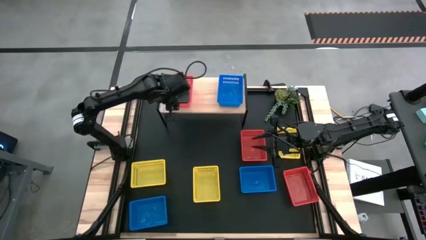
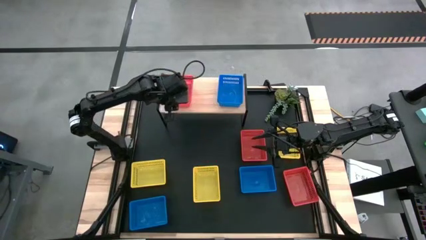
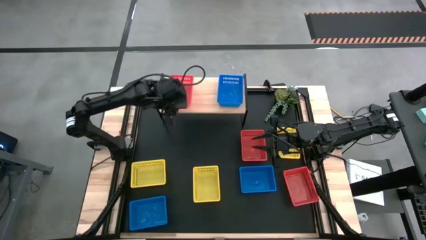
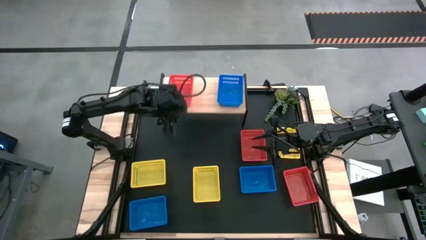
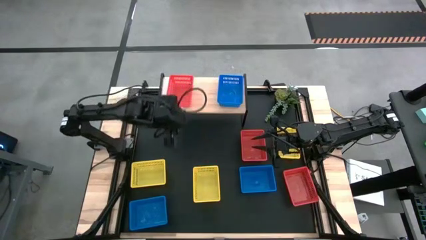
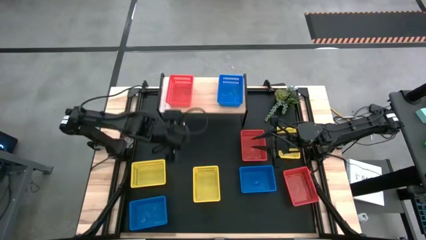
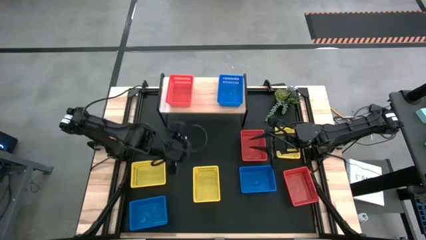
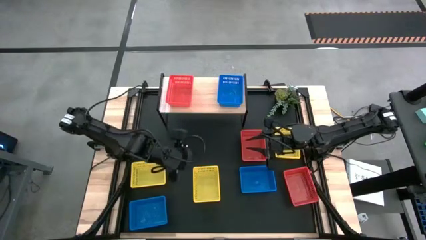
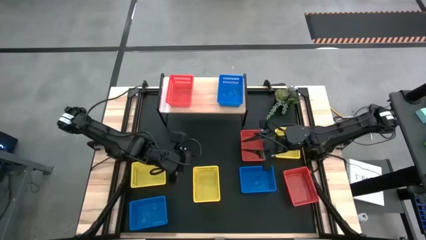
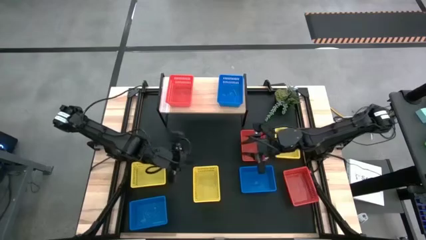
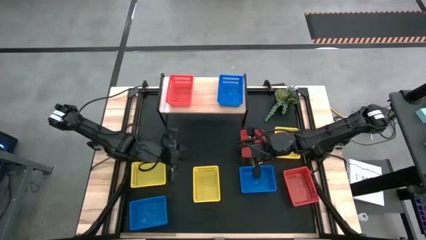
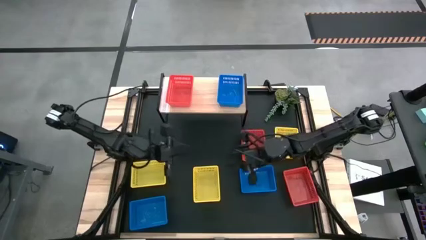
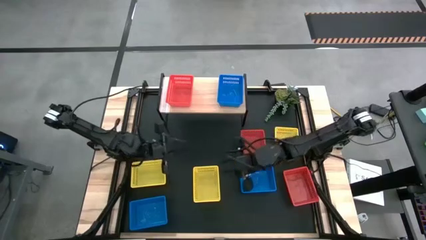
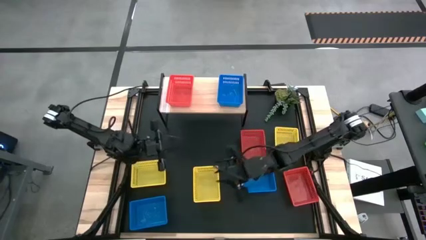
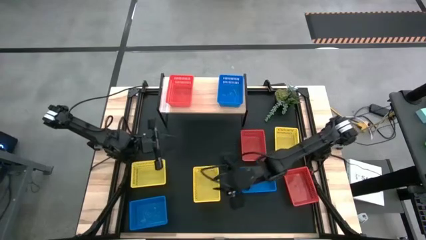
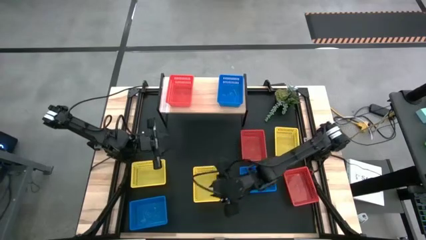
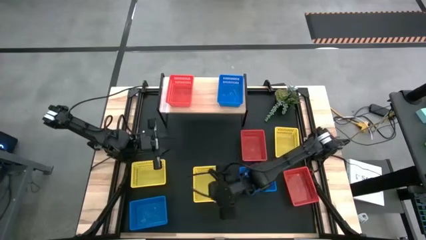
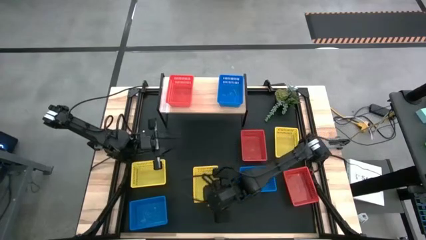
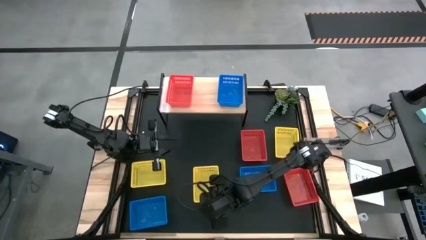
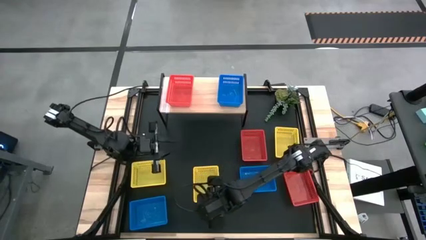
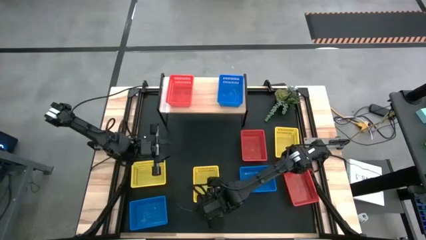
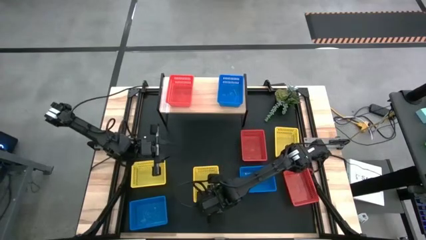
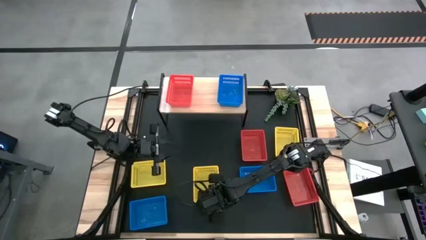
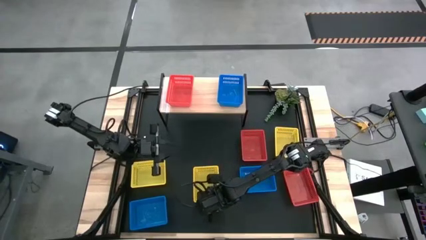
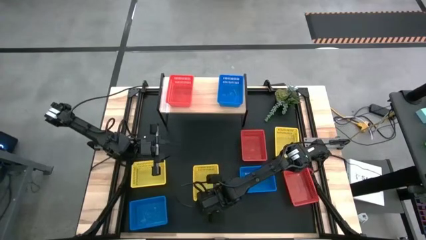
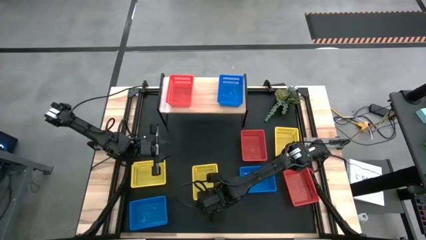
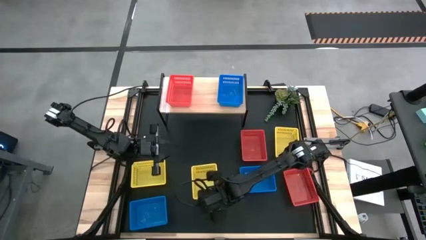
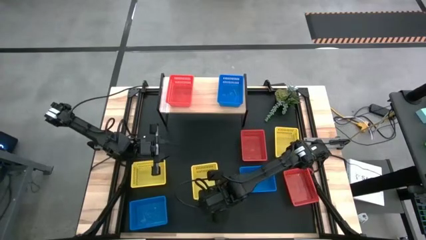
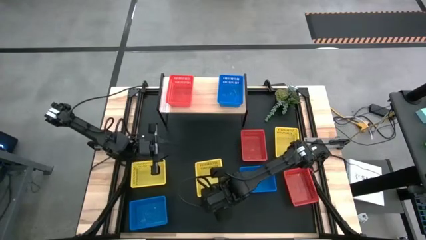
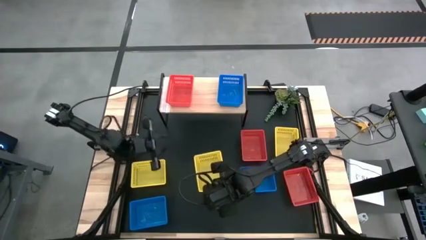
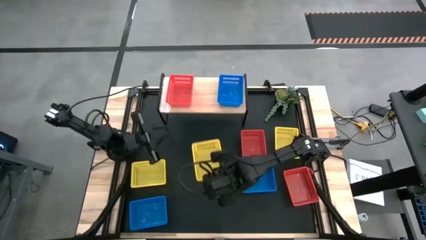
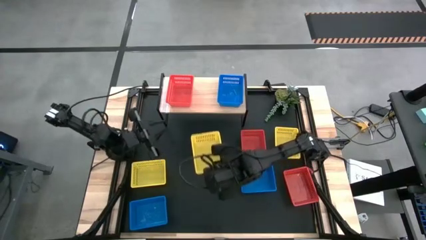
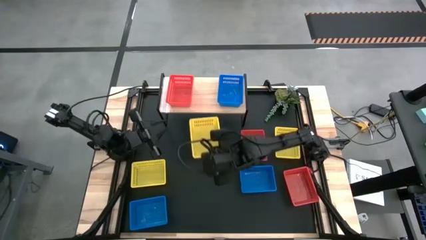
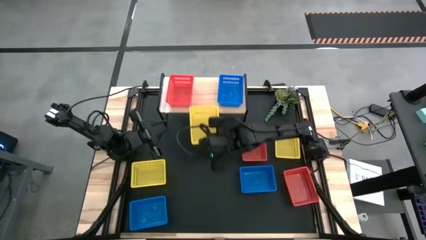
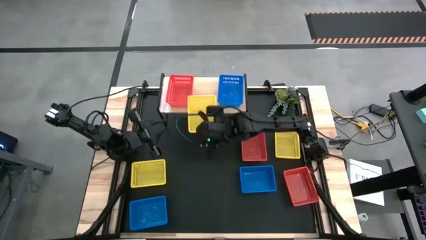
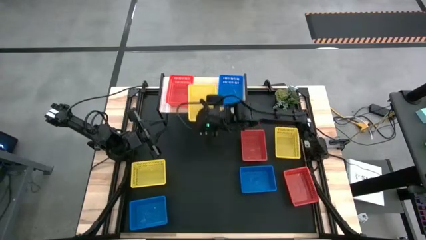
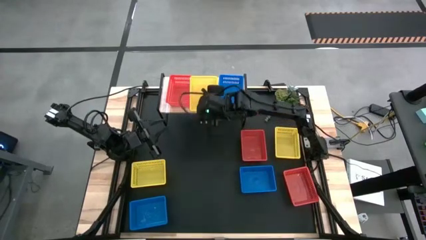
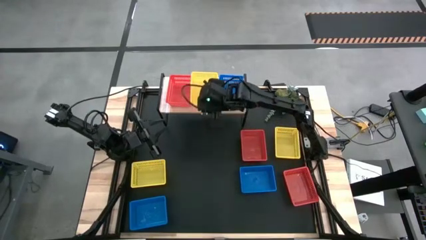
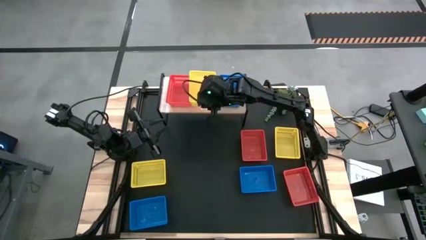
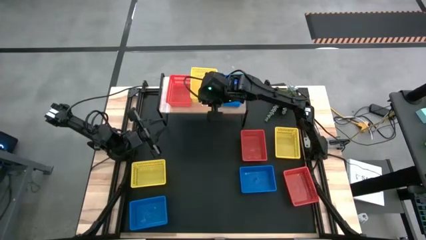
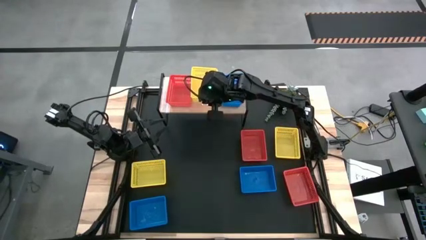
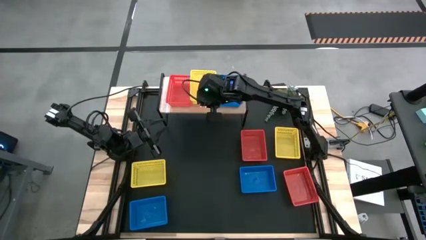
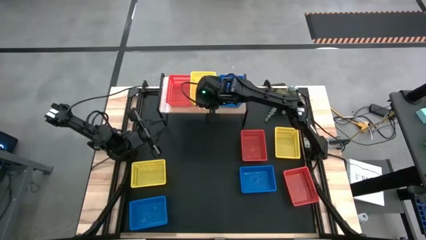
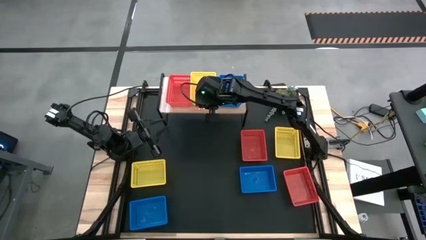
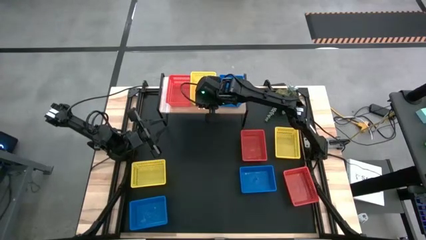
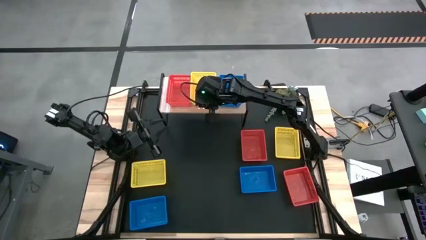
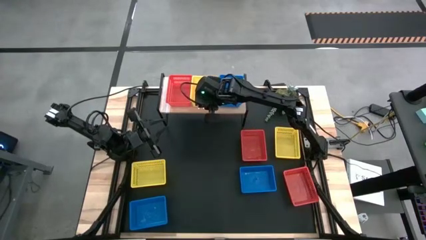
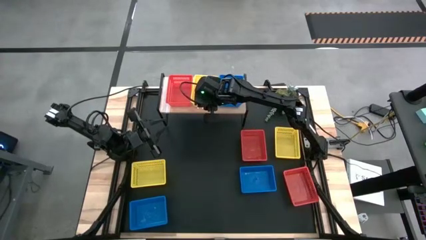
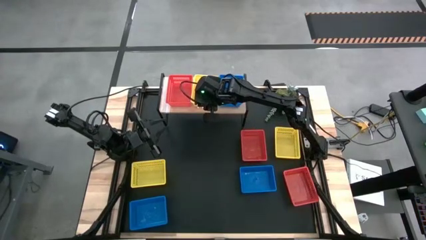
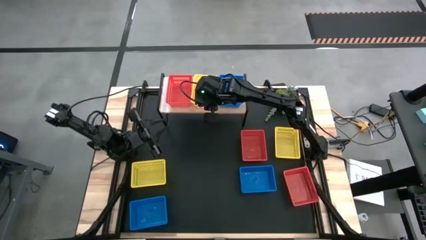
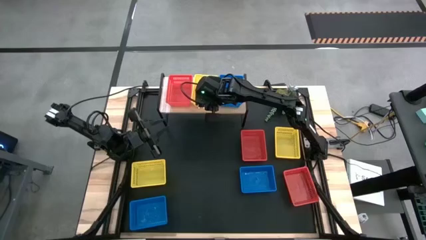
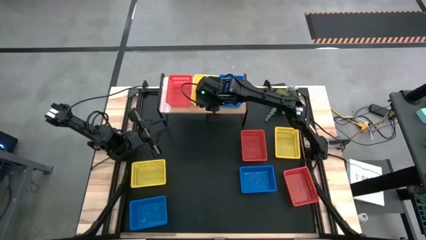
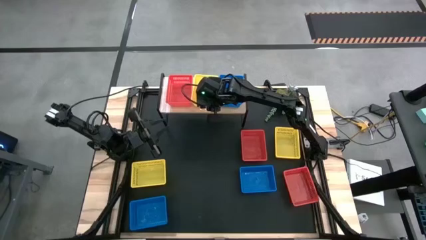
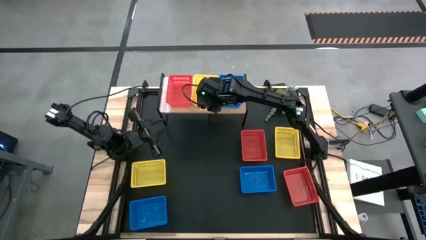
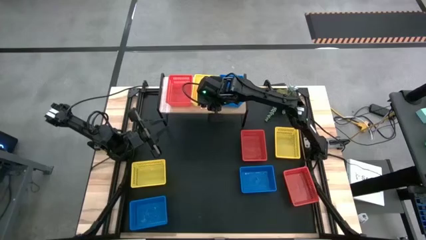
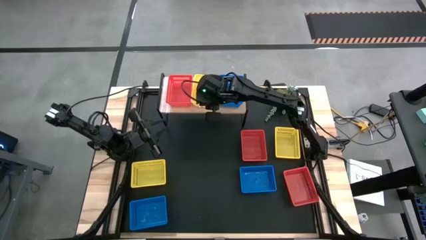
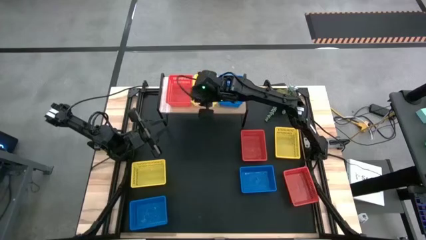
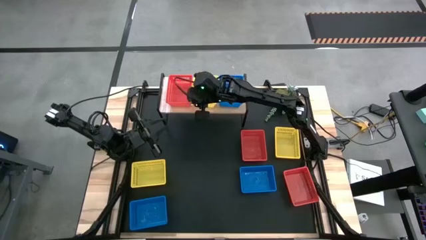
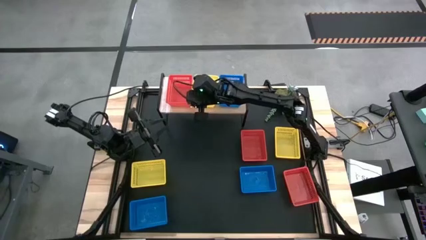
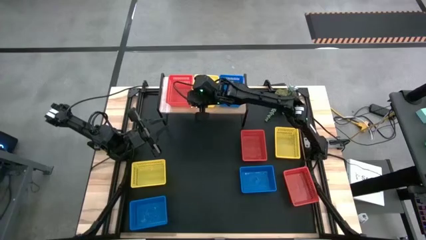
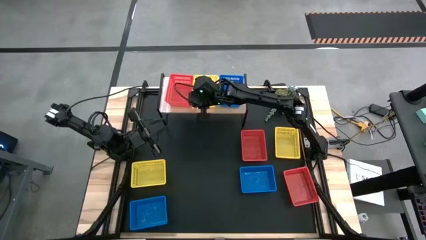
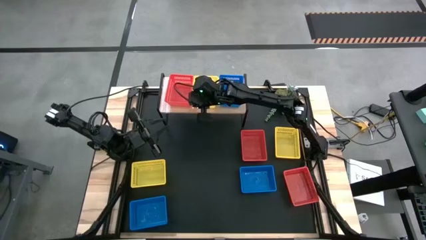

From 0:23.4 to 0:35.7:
Task: Stack baskets on shelf by color
Put the center yellow bin on the shelf

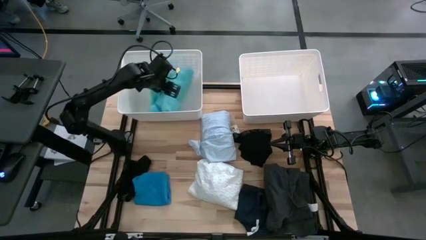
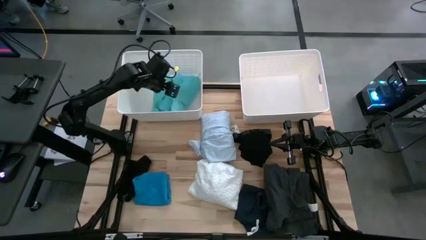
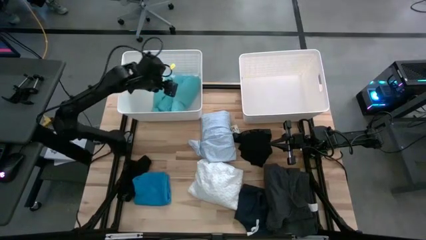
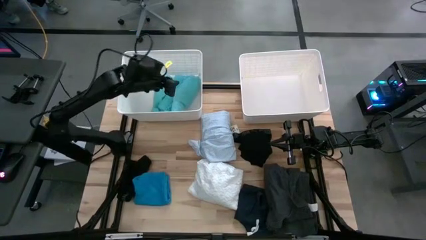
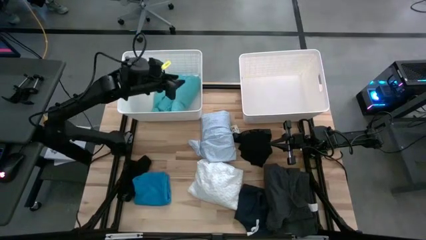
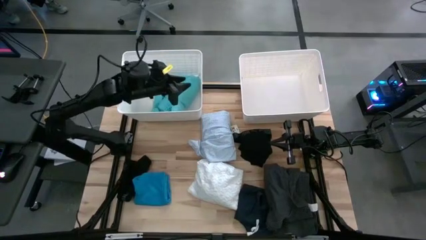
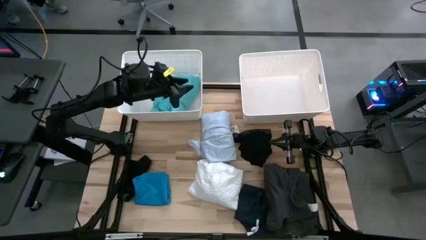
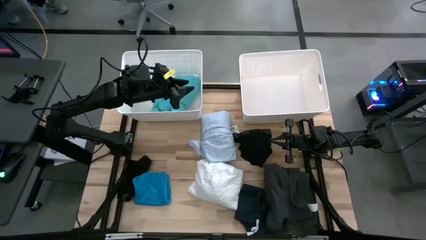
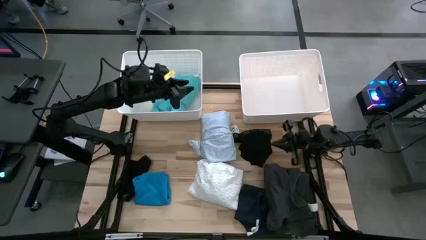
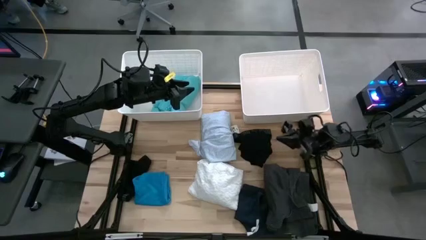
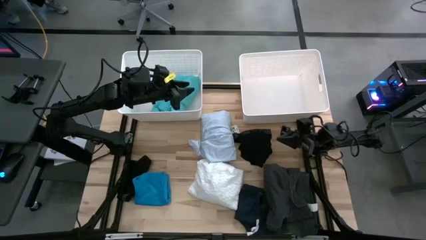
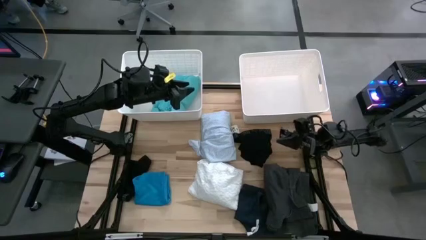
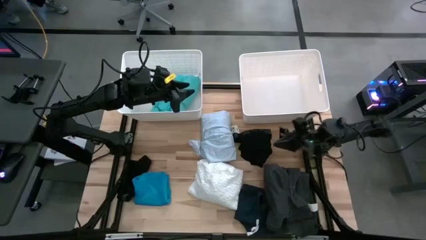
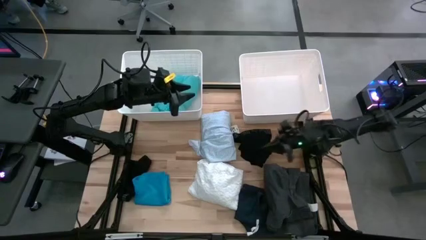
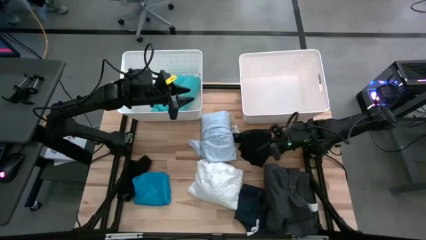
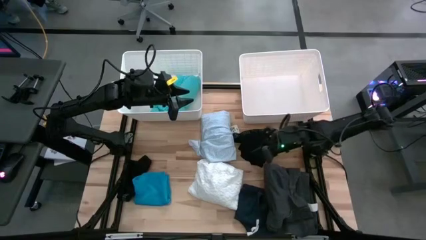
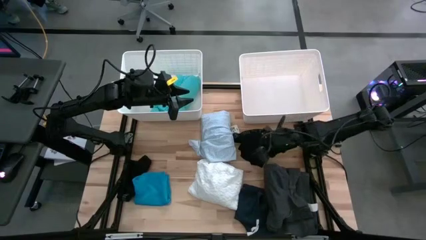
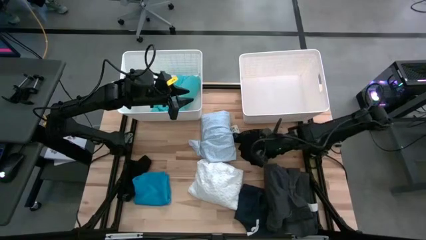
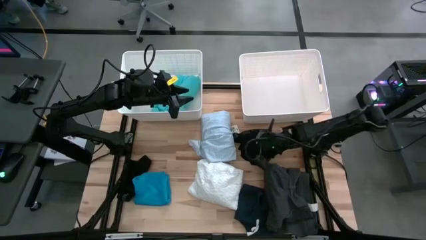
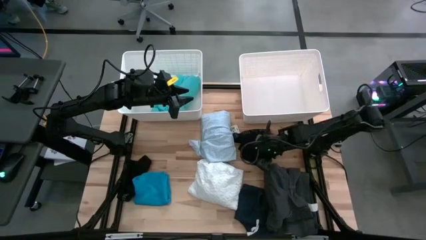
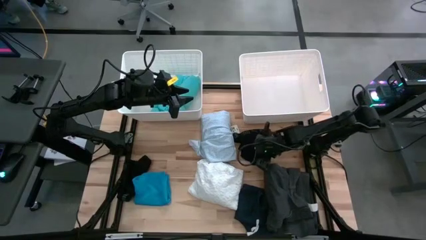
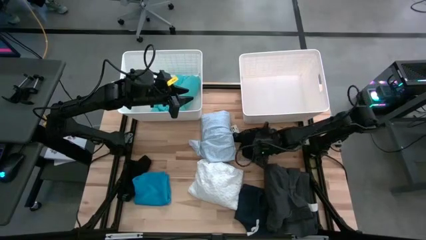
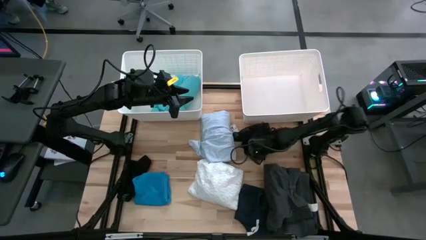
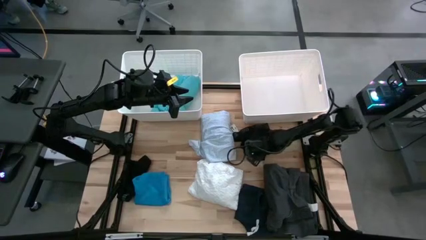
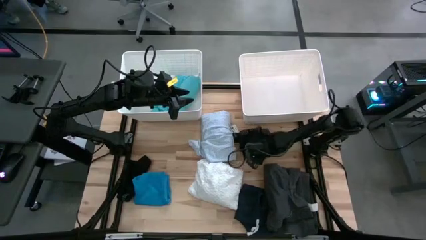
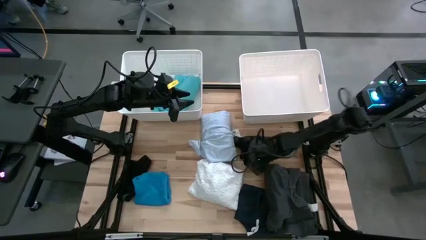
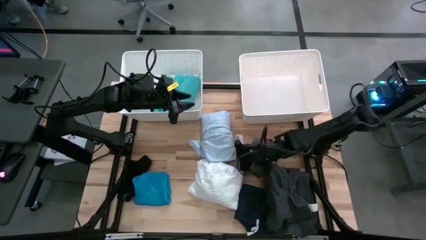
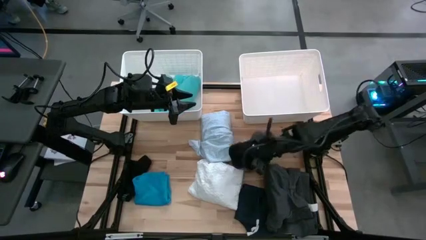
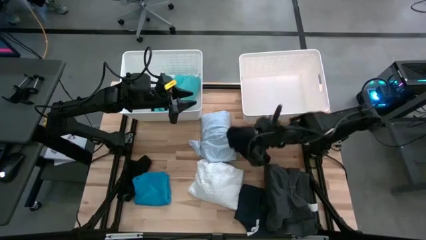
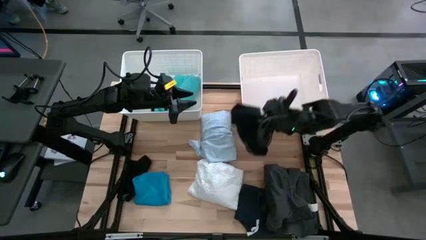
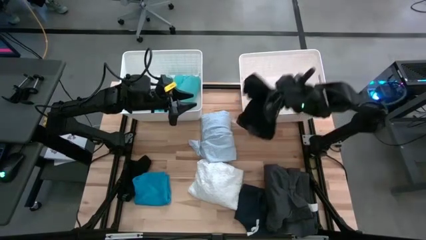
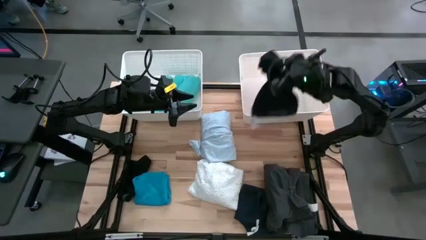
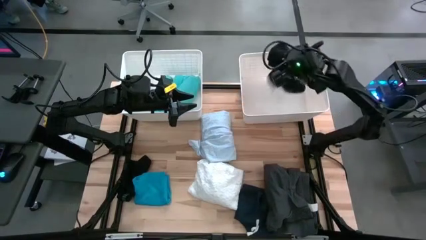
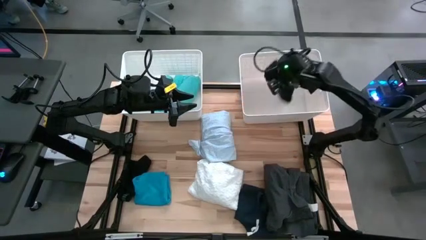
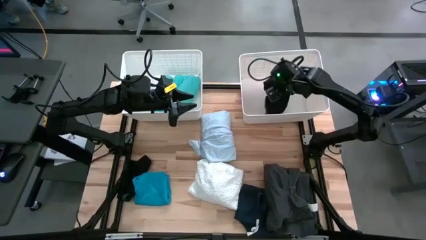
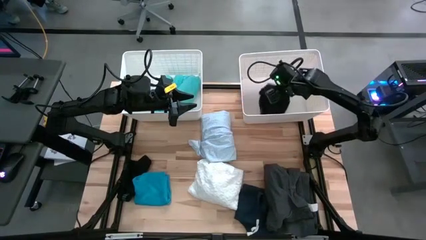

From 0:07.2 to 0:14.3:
Task: Sort clothes
Put the black boxer into the right white bin
